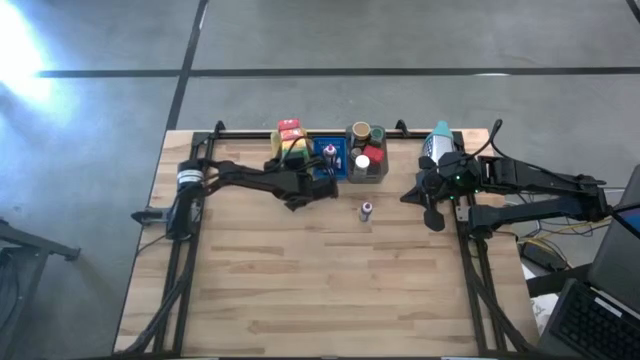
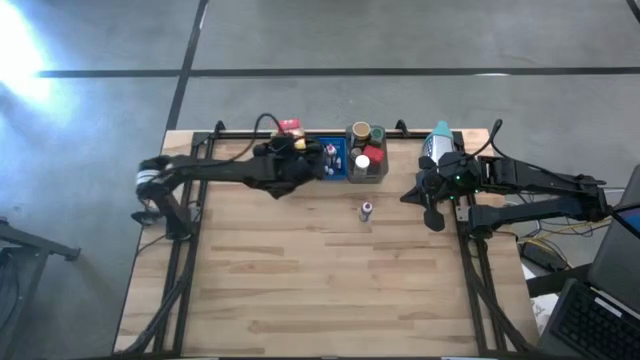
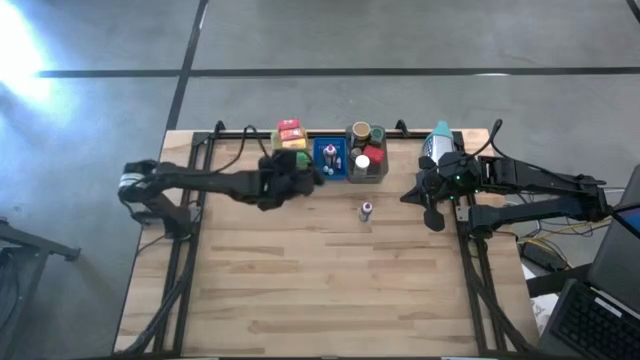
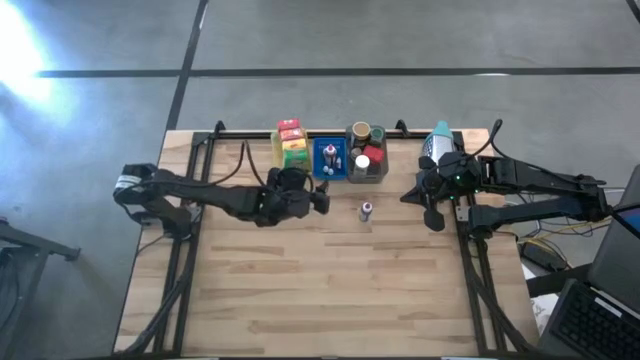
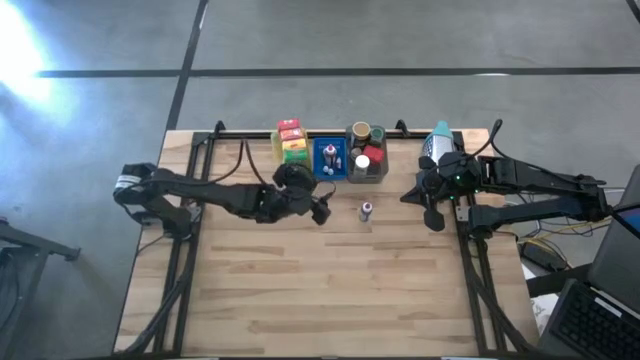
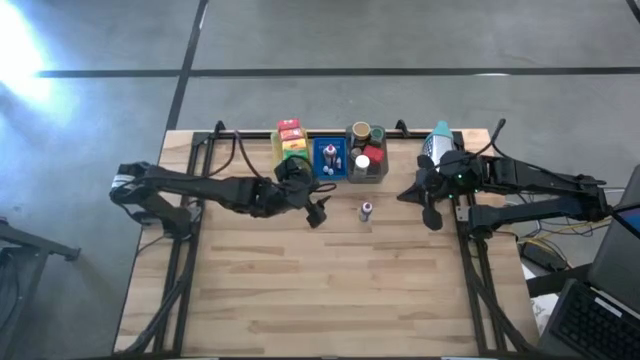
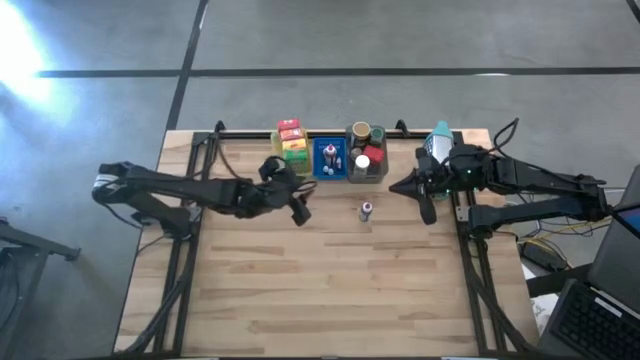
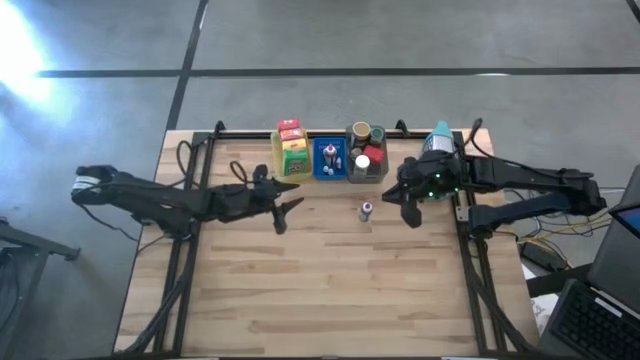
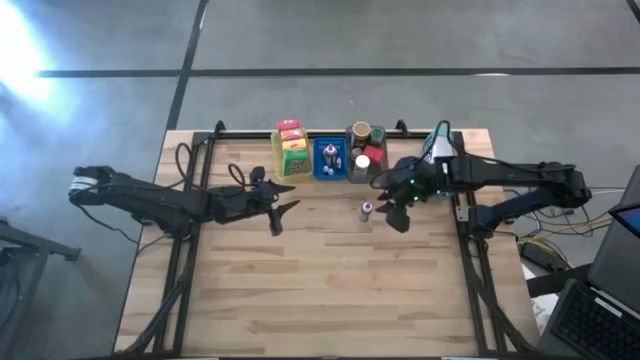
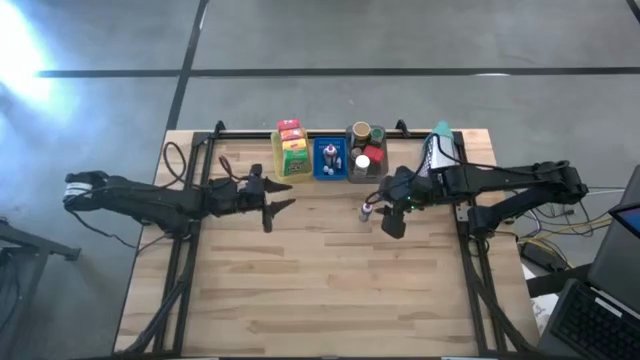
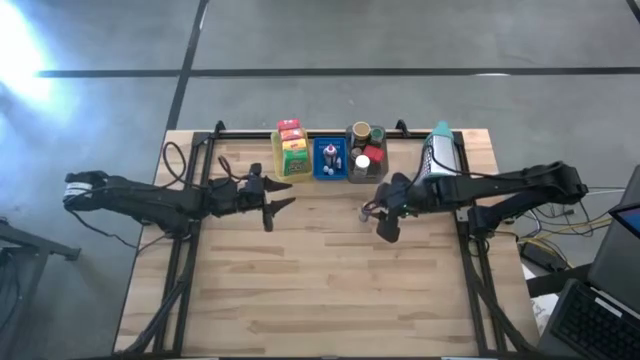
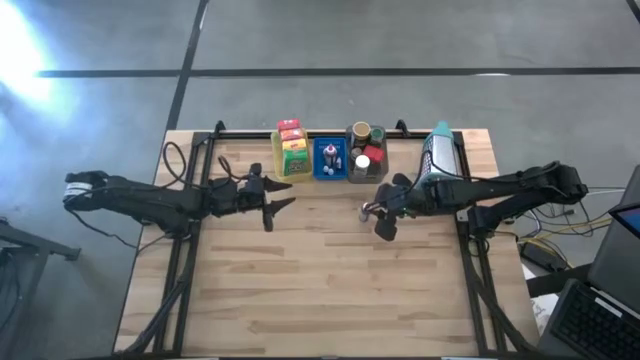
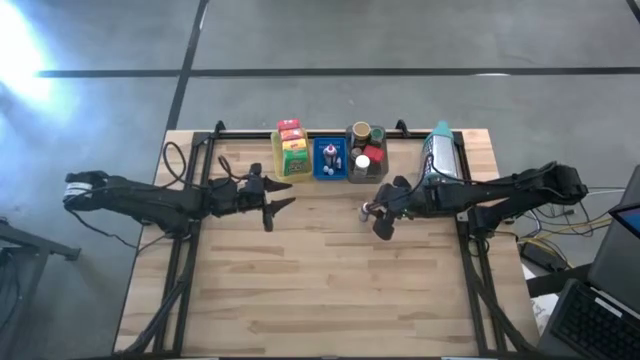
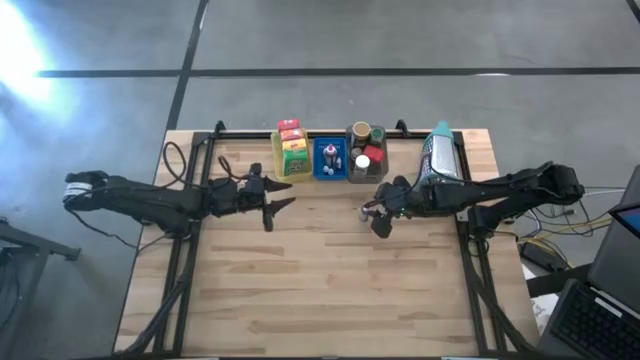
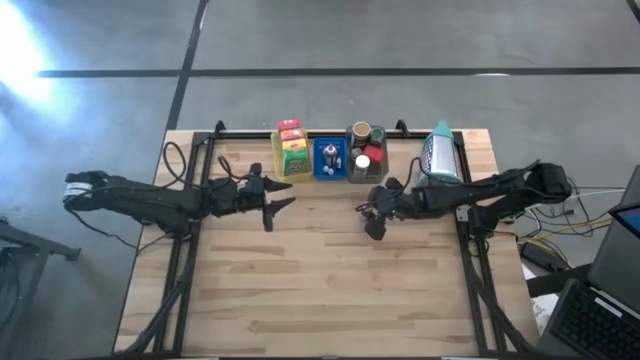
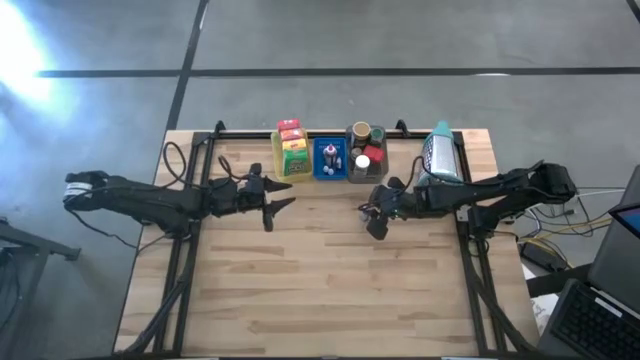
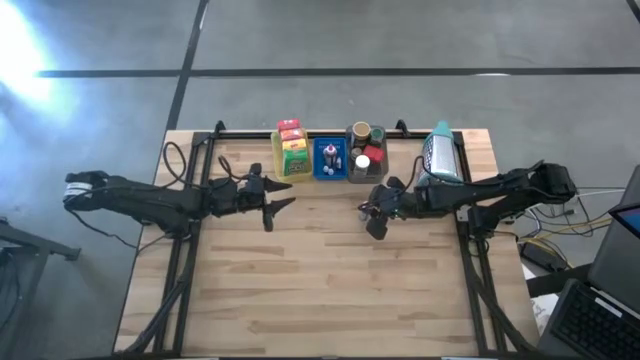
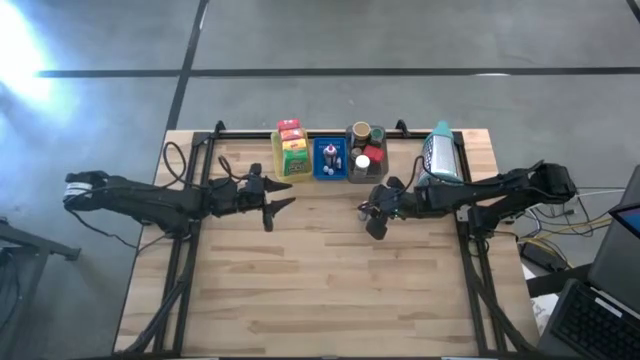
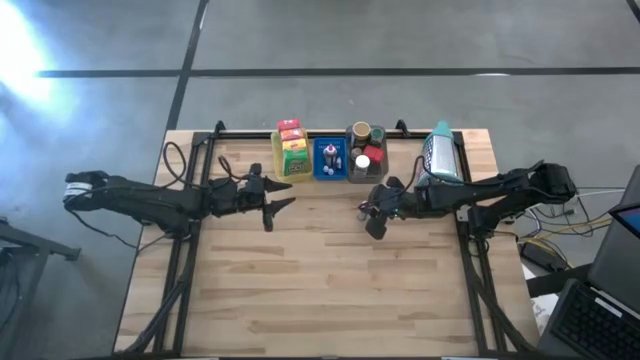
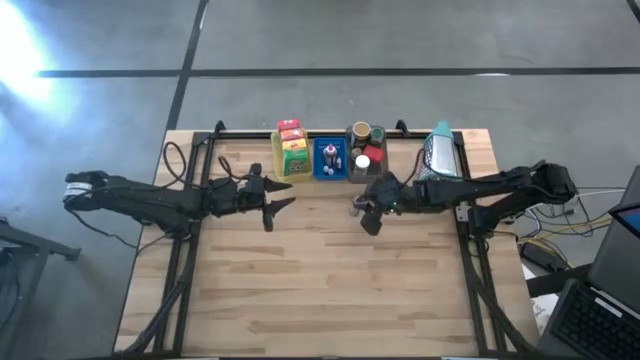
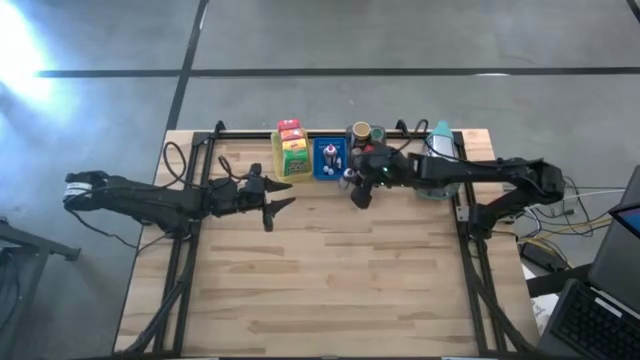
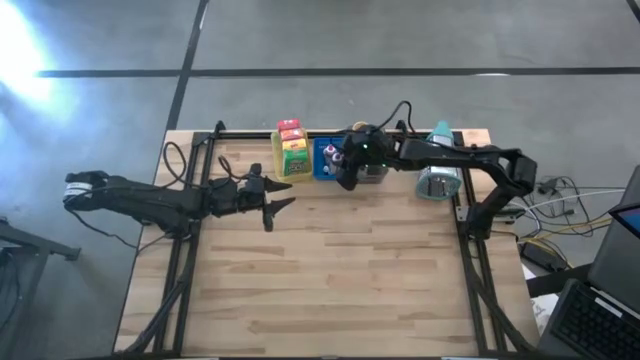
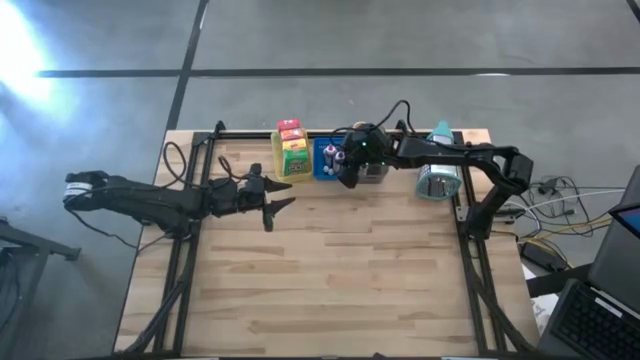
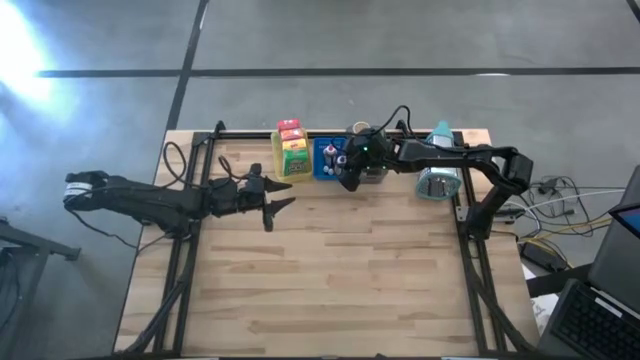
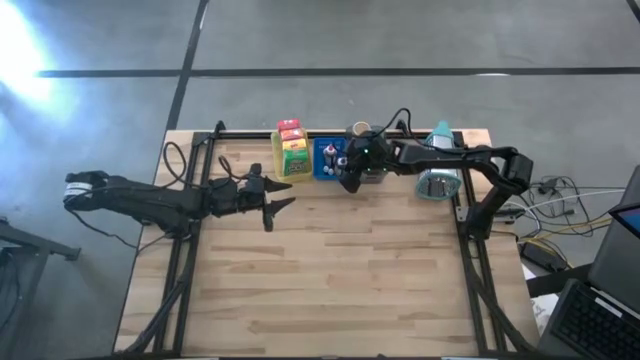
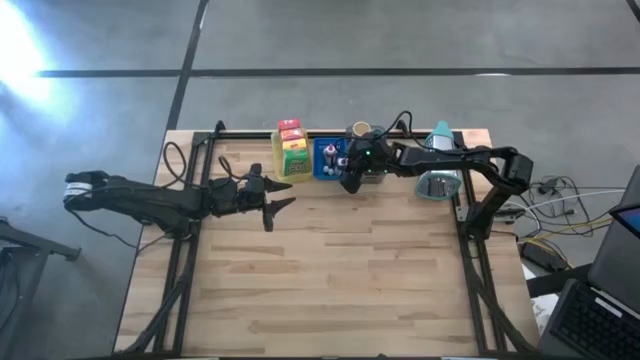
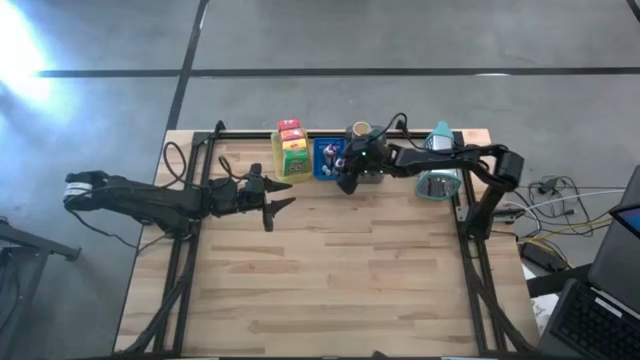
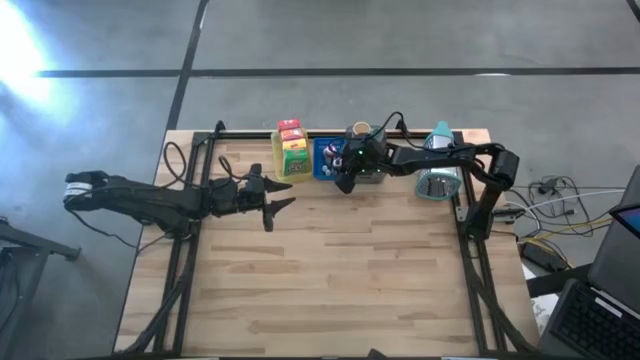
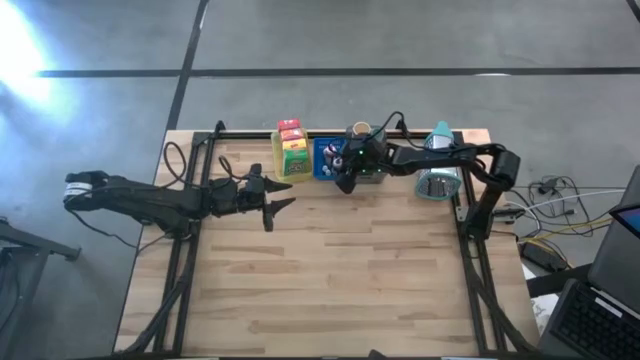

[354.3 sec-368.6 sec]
Task: Pick & Place Kitchen Items
Put the large purple food coloring bottle into the blue bin

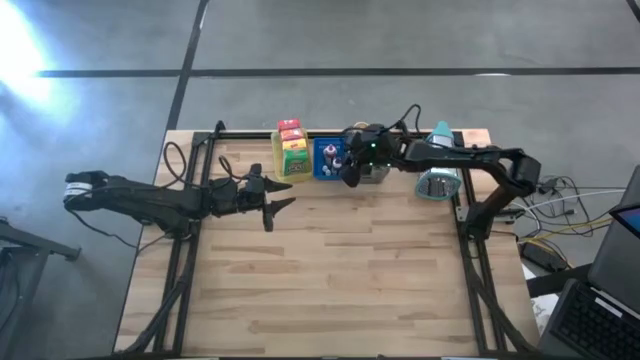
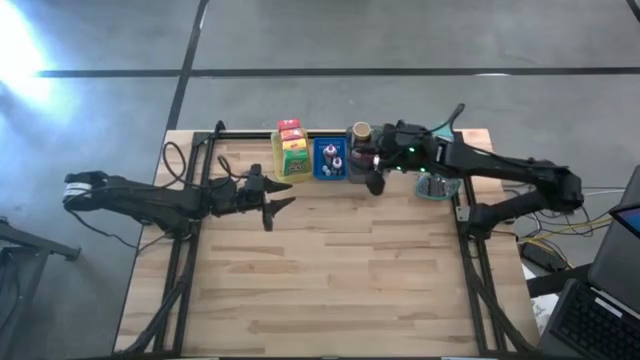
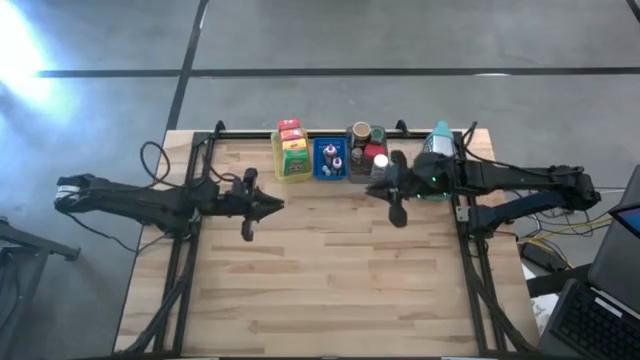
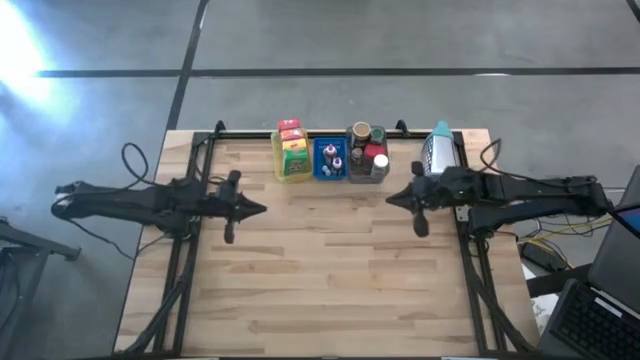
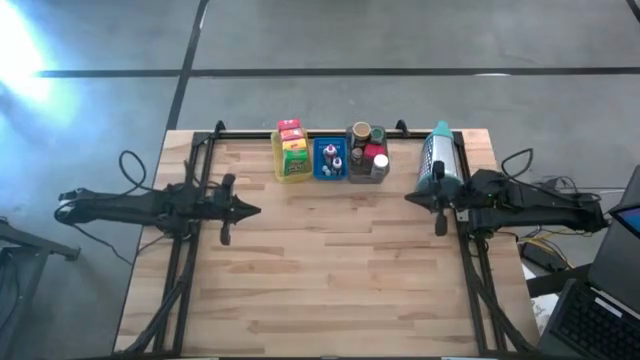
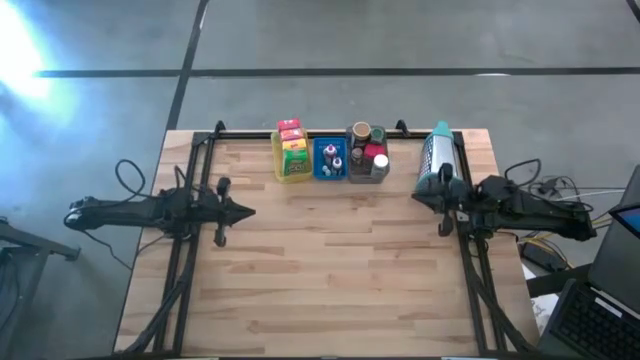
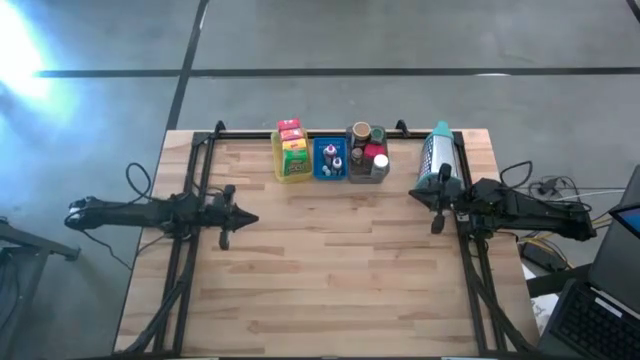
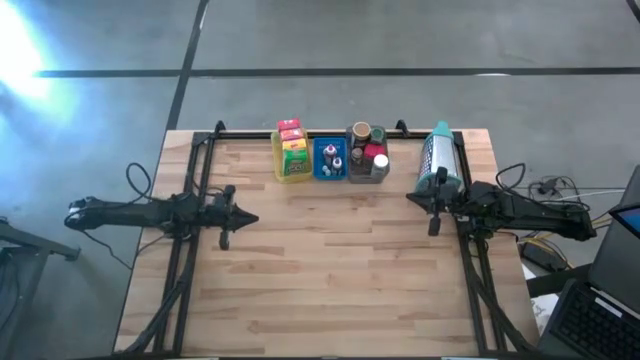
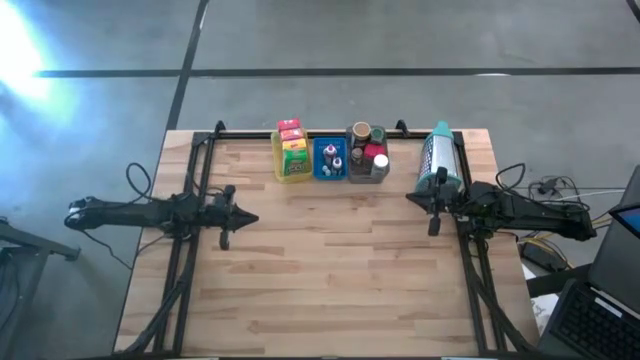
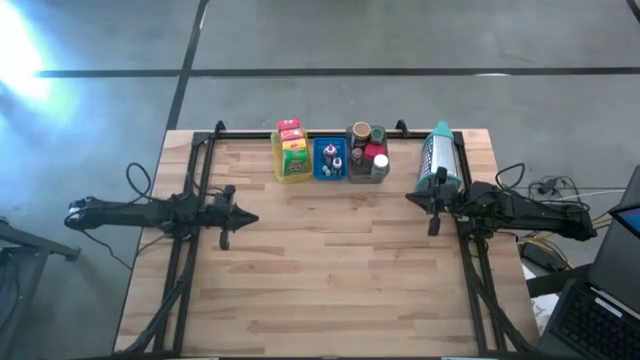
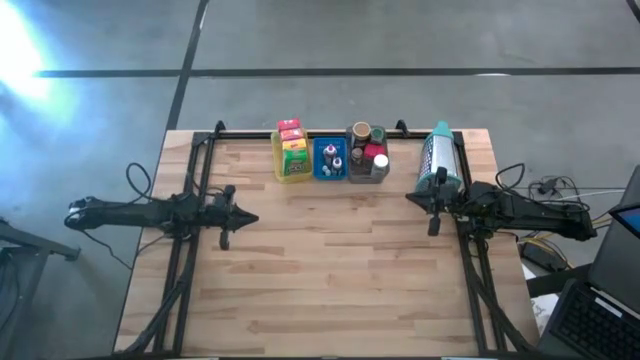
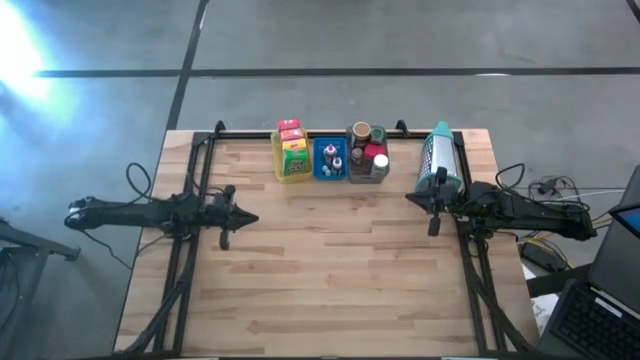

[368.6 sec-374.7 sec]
Return to Home Position

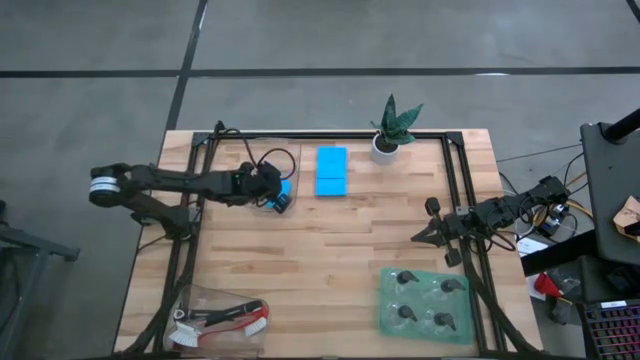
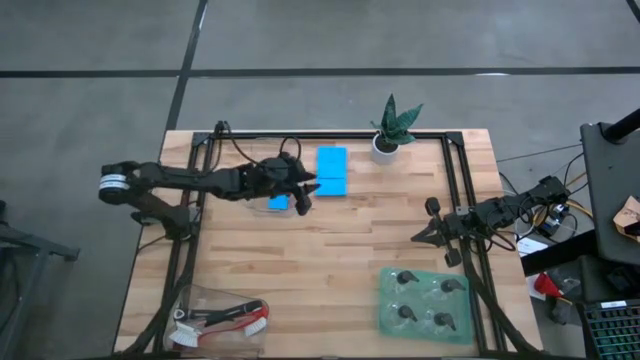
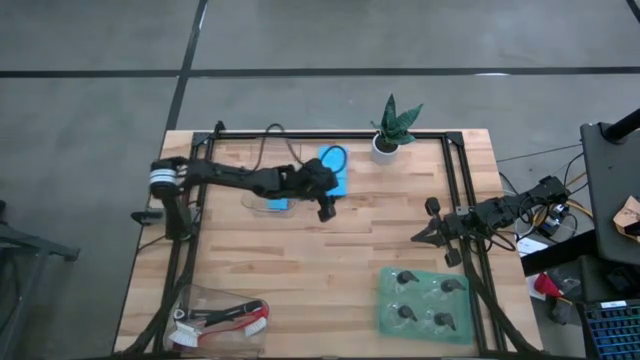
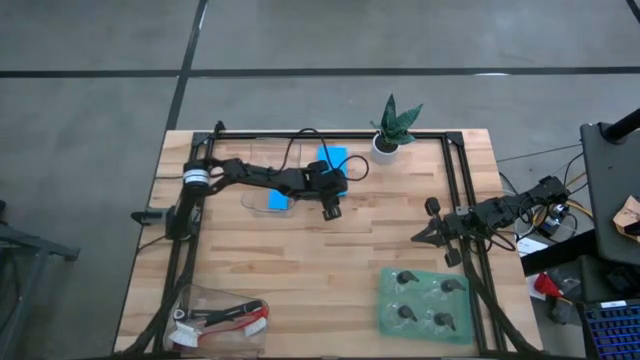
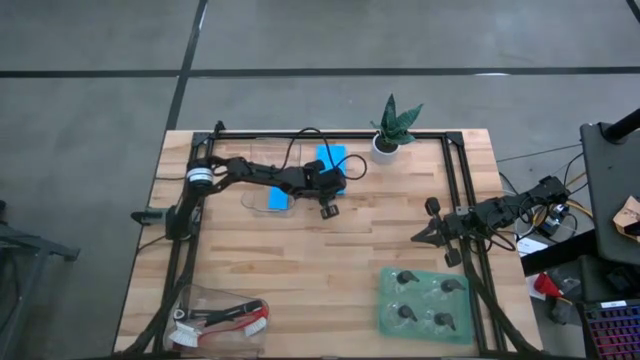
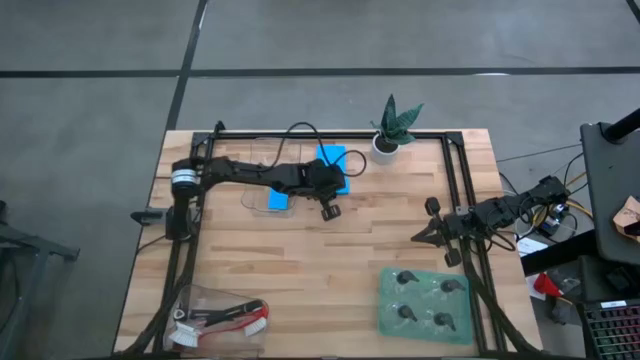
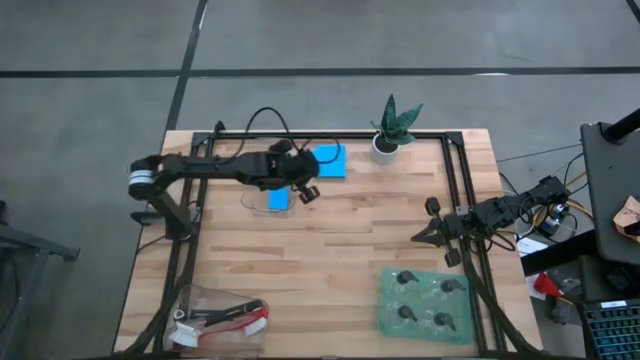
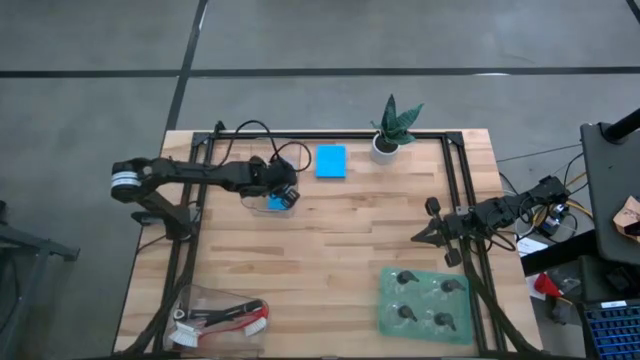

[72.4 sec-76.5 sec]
Task: Pick & Place Kitchen Sink Supplies
Put the sponge into the top transparent bin
